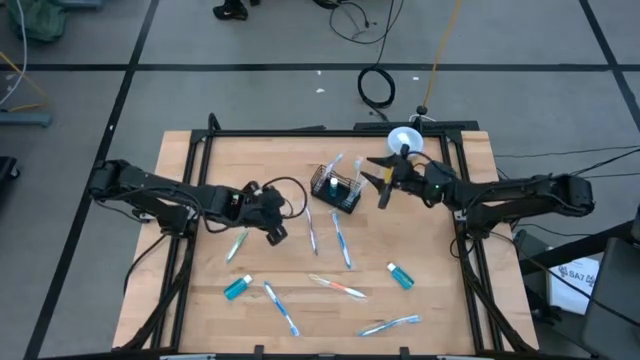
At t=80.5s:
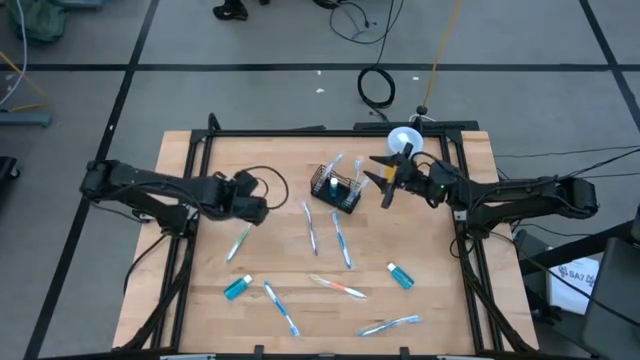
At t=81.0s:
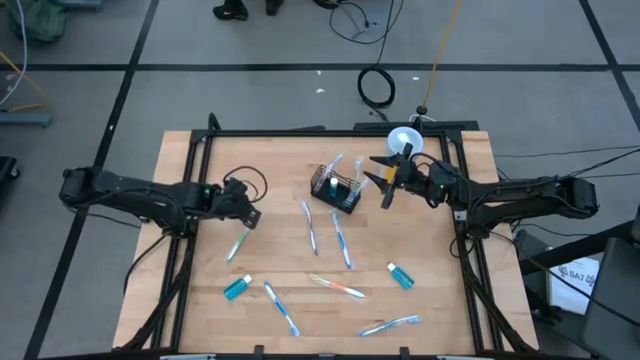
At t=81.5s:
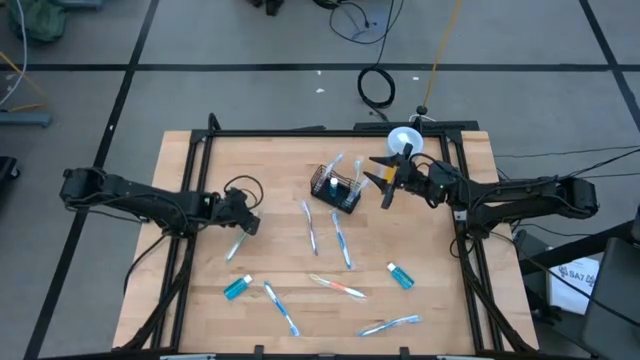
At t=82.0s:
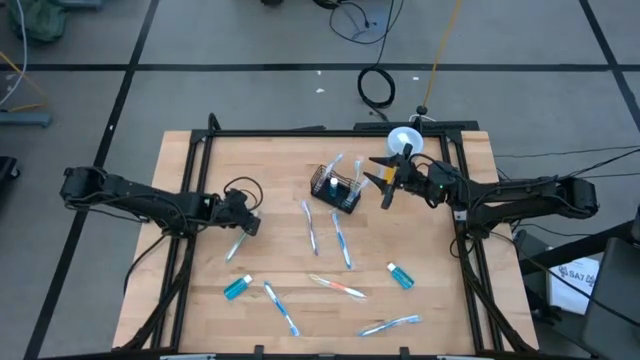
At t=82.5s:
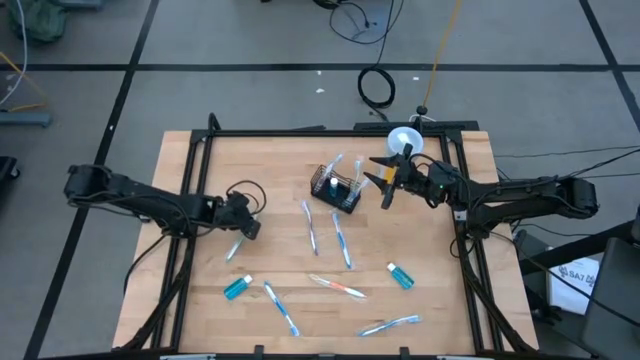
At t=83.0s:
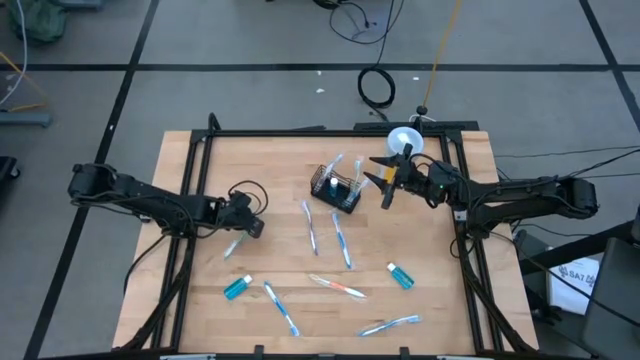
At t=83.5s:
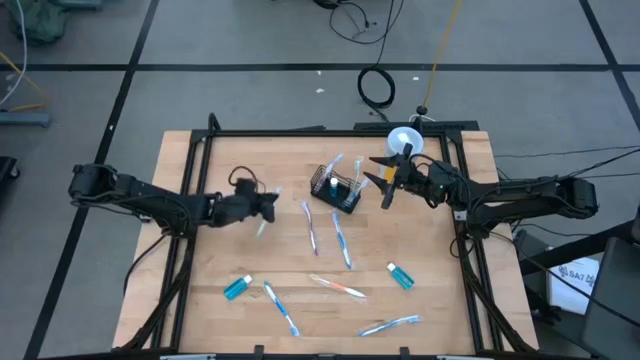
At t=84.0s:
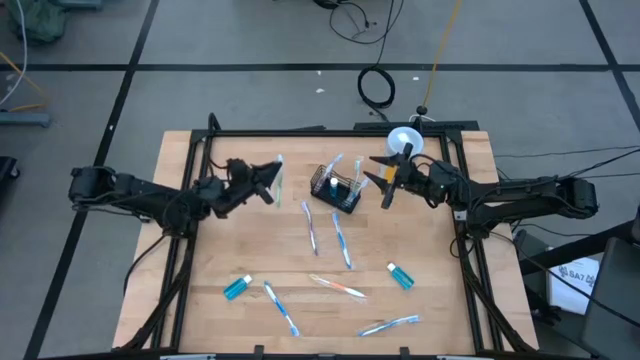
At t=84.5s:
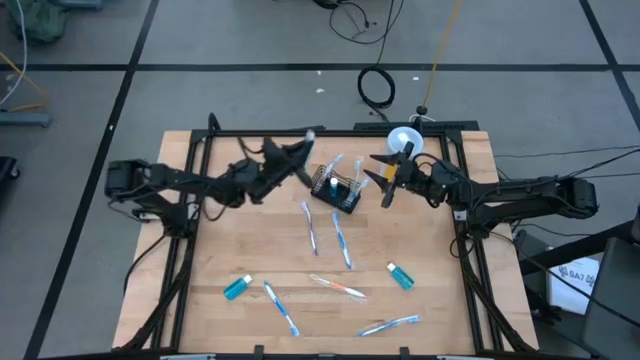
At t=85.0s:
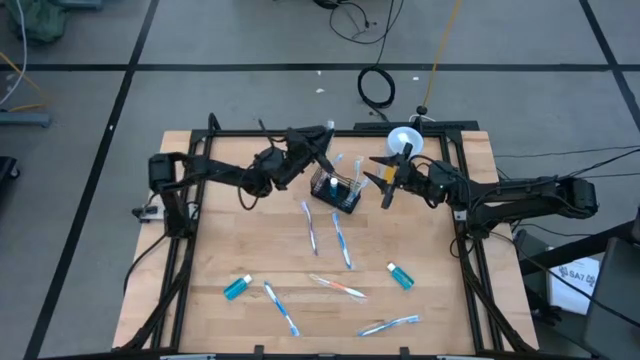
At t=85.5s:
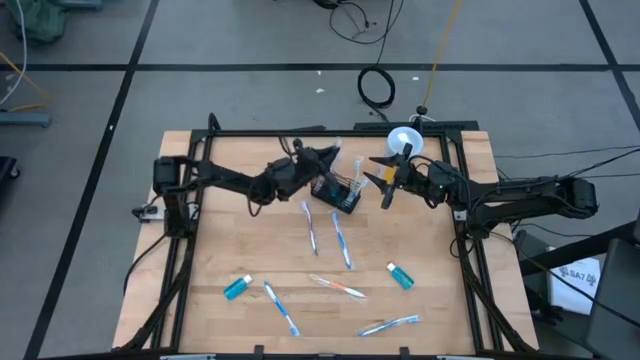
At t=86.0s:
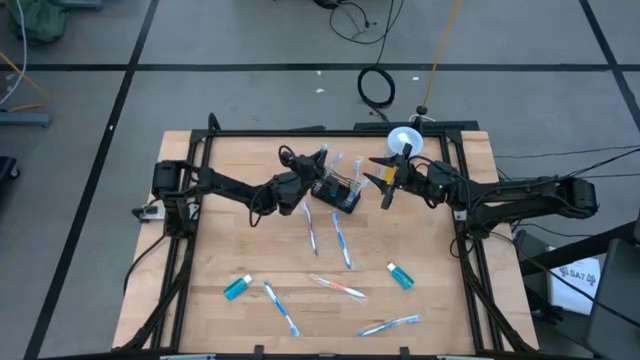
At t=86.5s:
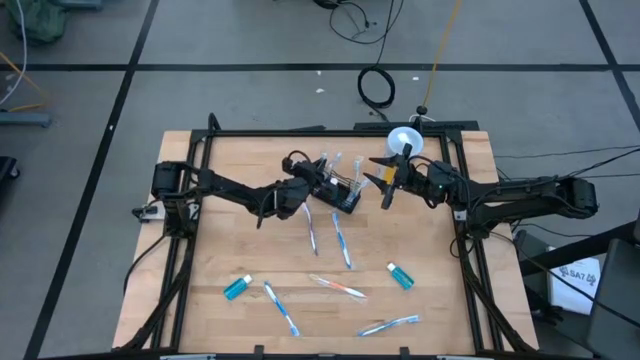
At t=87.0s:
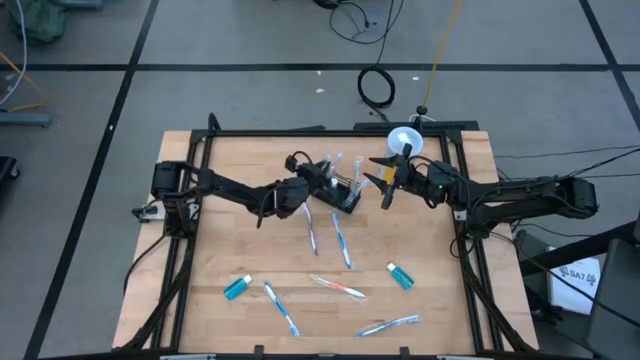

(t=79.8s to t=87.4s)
Task: Pick & Place toothbrushing station
Put the green toothbrush into the black organizer

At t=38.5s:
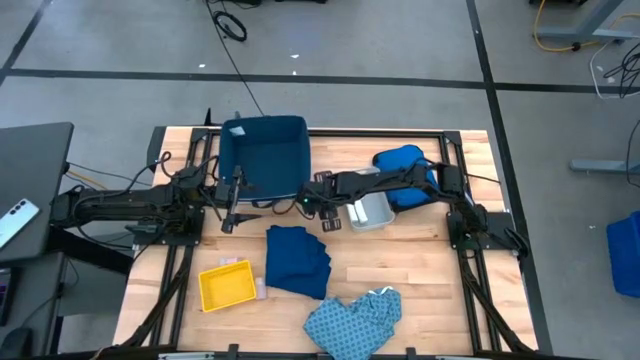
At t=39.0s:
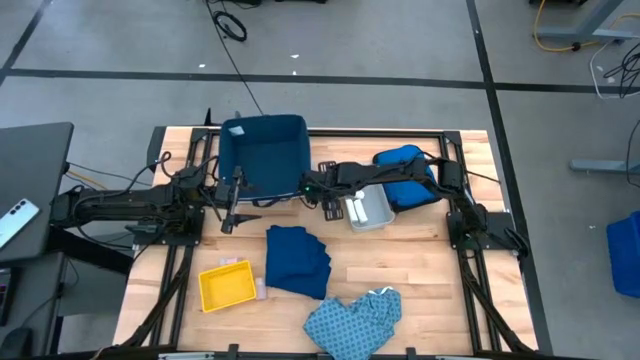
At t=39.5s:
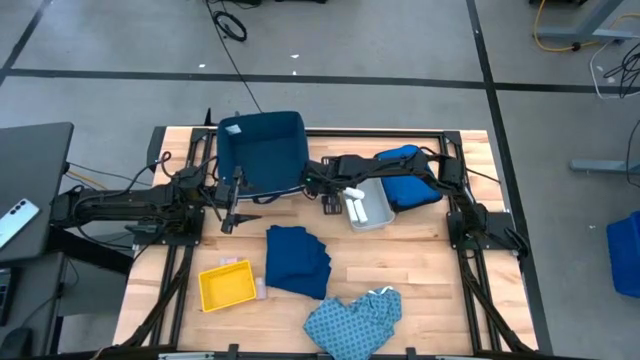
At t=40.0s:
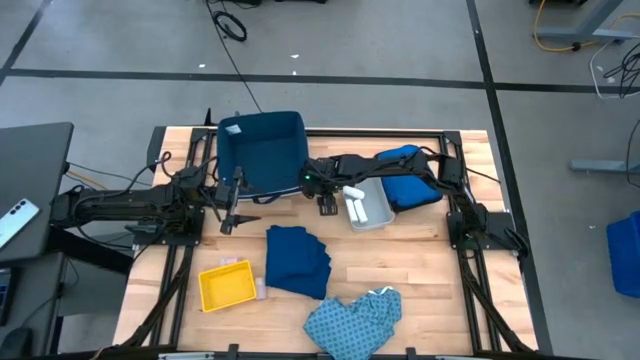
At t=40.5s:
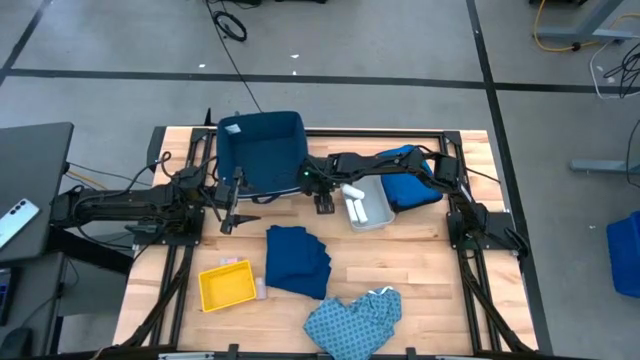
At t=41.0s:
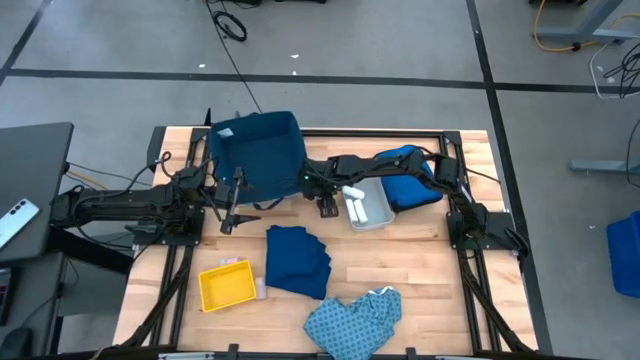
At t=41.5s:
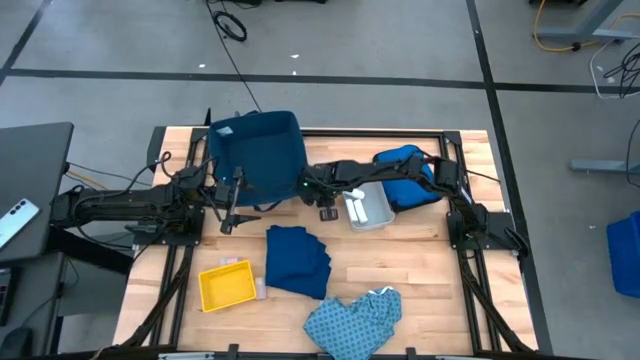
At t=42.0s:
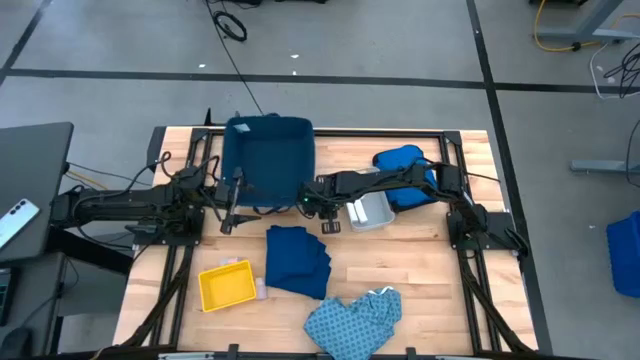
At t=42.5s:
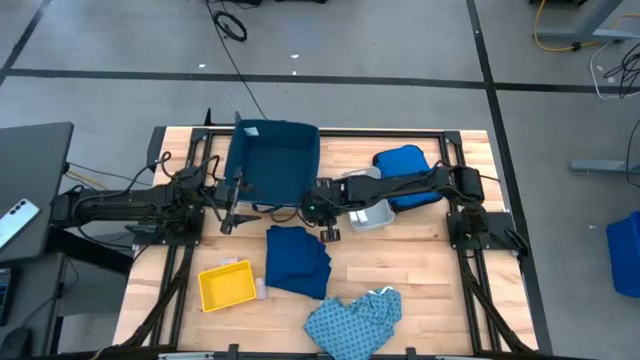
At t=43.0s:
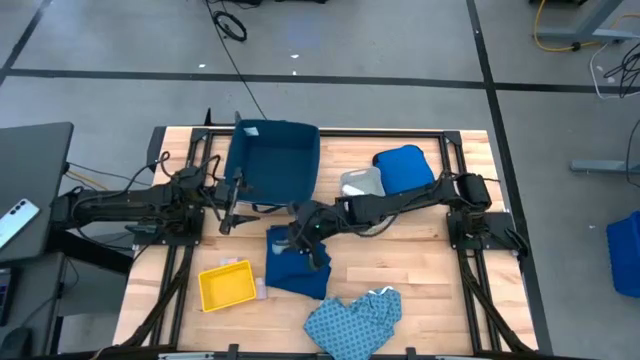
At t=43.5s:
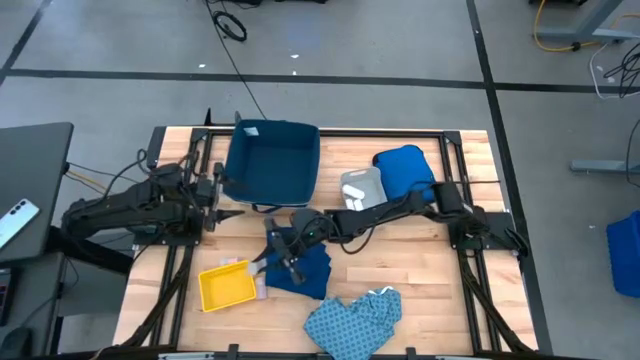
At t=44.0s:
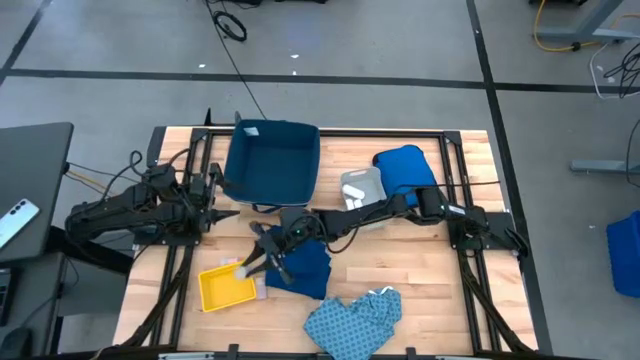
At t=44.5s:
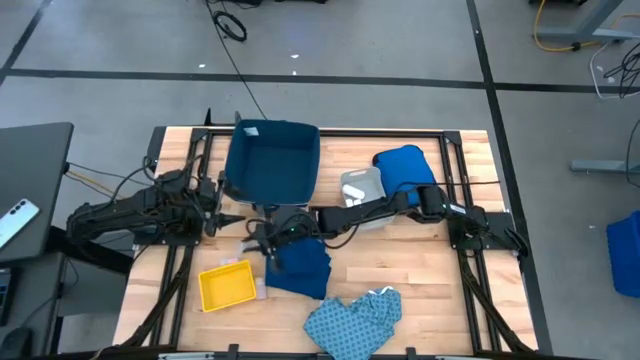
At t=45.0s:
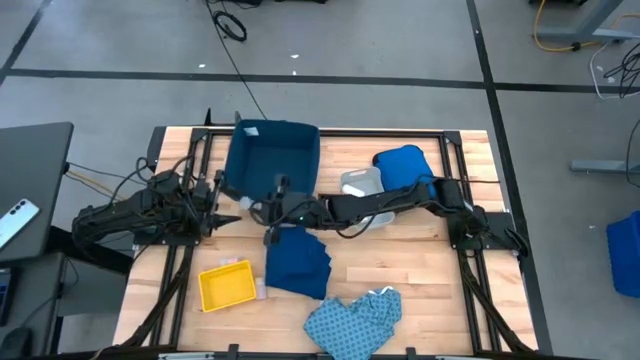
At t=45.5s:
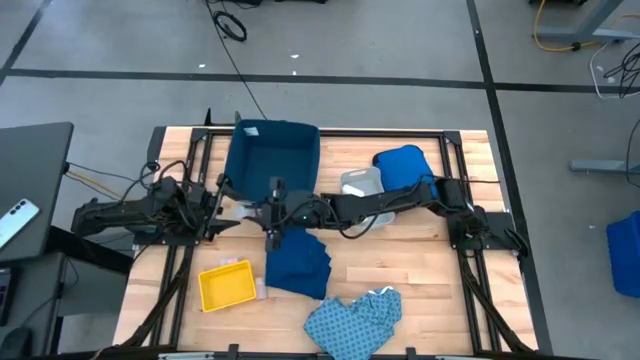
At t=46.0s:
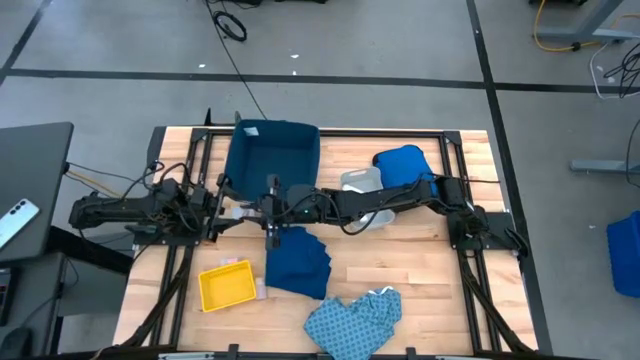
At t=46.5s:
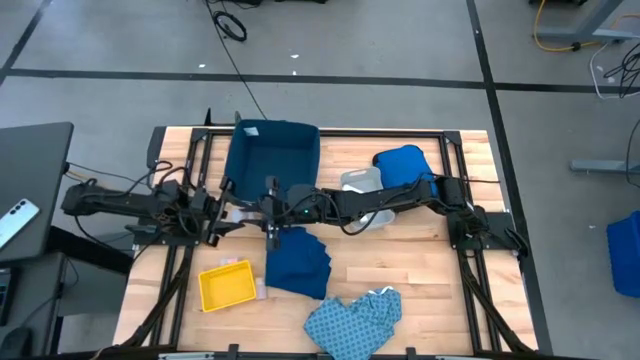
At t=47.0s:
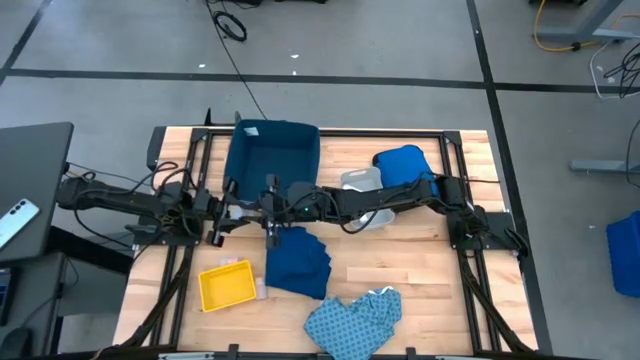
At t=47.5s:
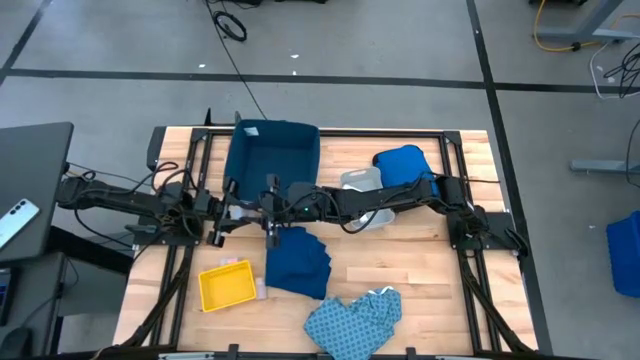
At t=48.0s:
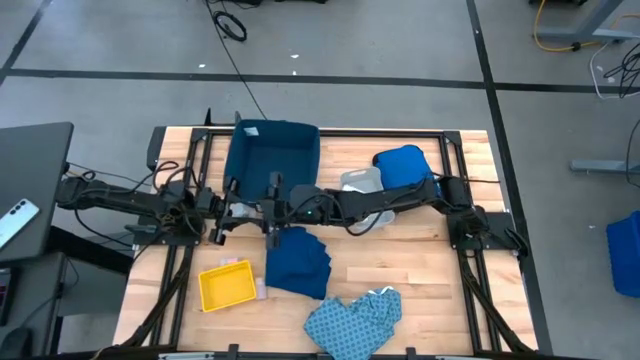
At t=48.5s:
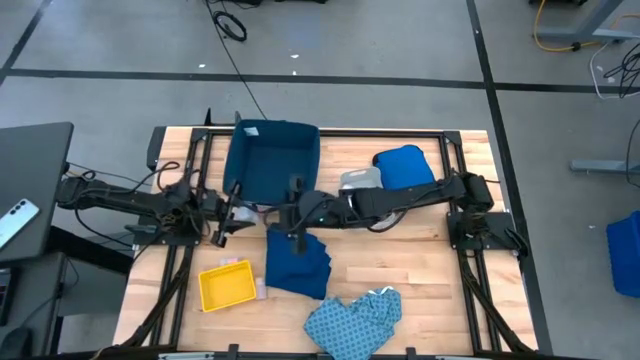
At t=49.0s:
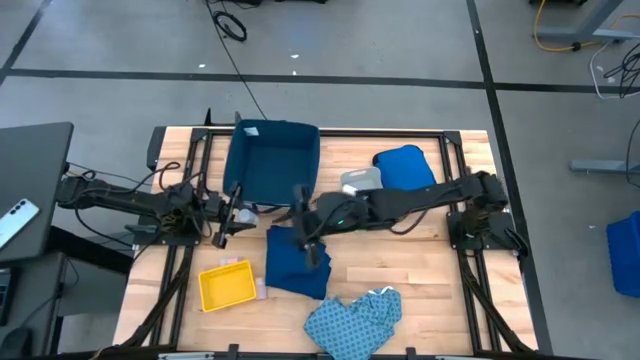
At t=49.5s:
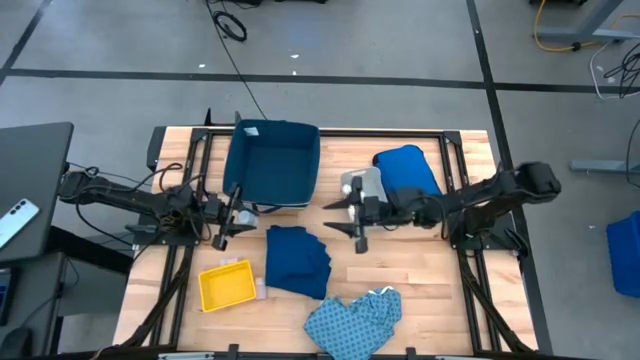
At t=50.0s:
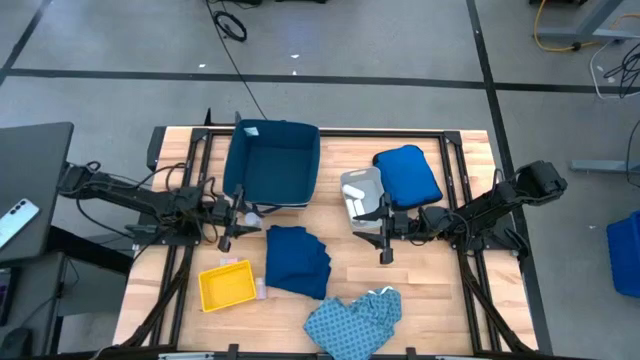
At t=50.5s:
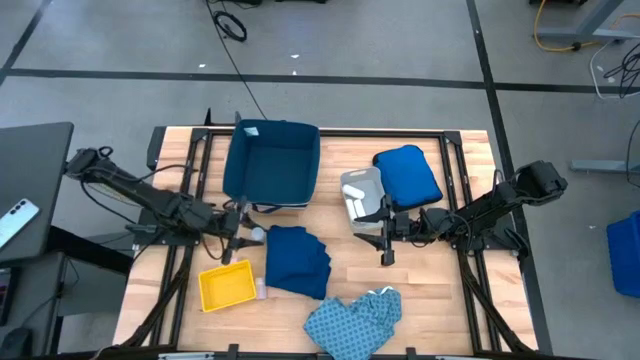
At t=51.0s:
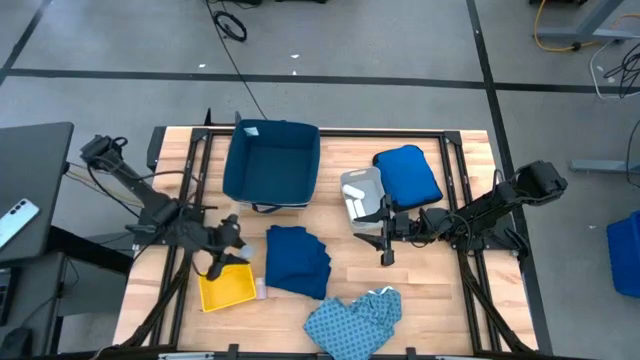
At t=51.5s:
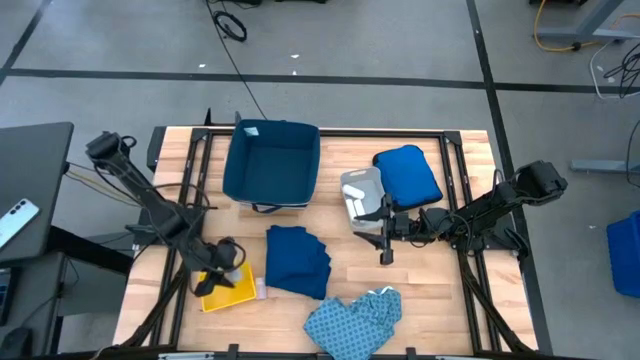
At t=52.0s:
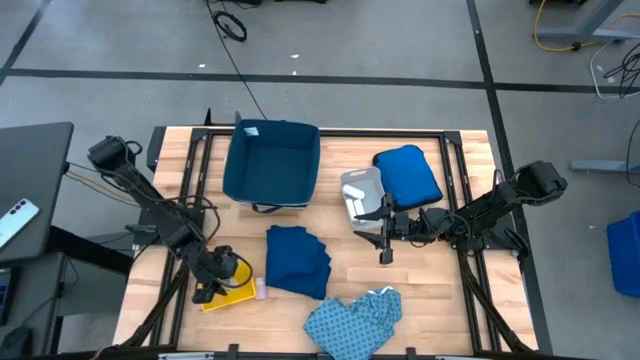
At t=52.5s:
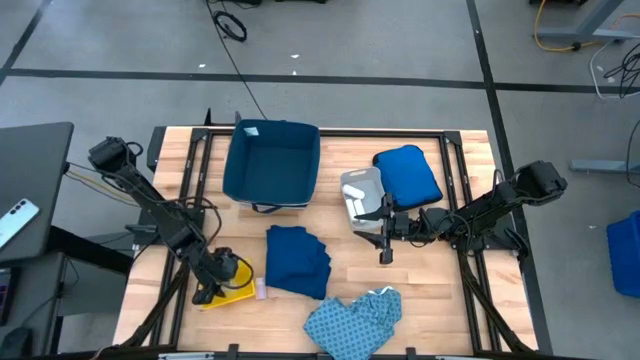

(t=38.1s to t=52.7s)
Task: Pick & place medical supplies in basket/bin
Put the top right transparent pill bottle into the yellow bin
